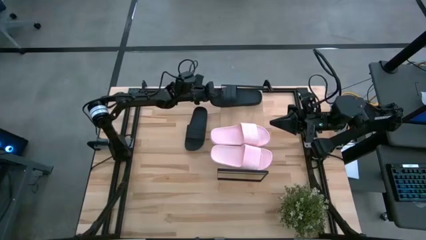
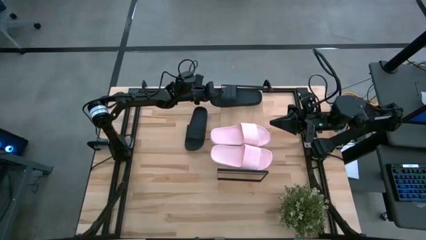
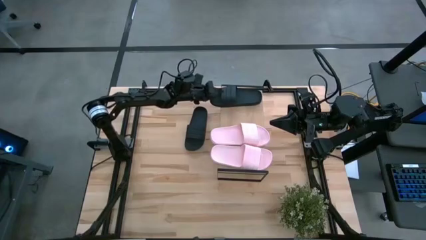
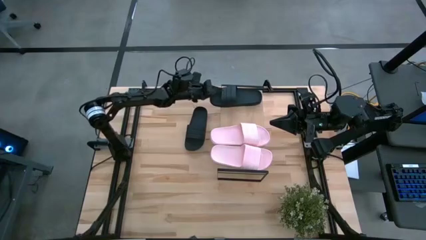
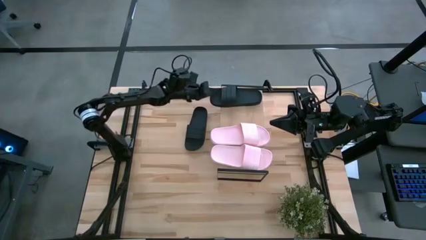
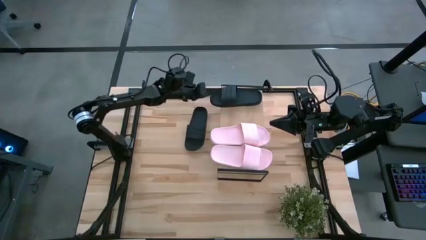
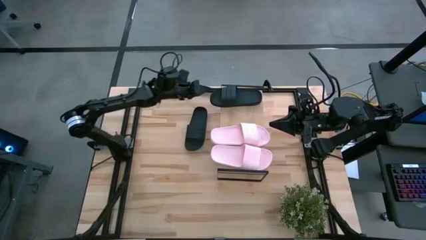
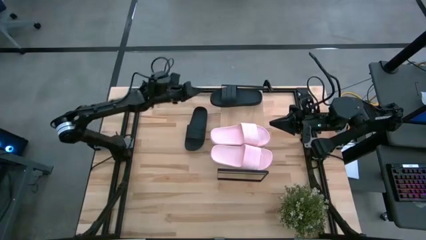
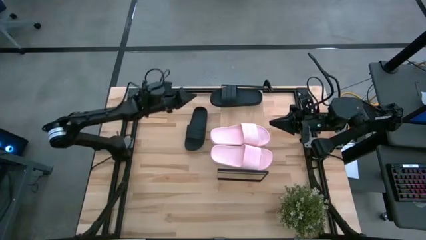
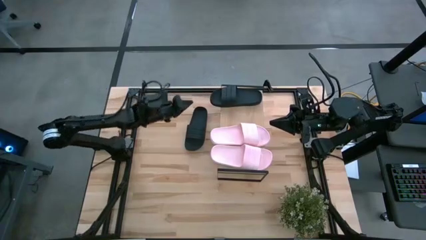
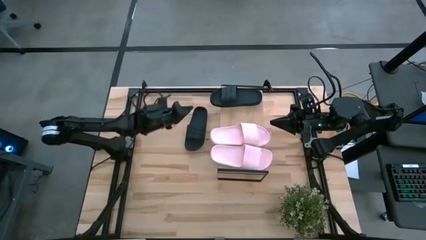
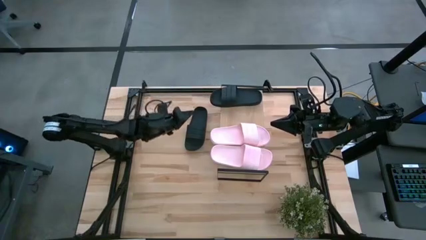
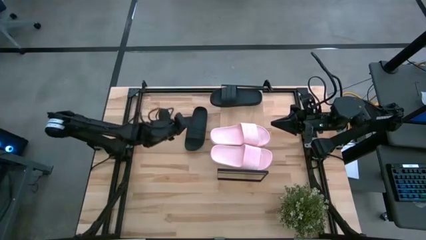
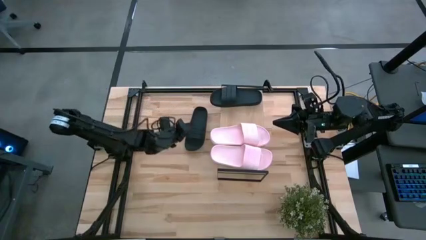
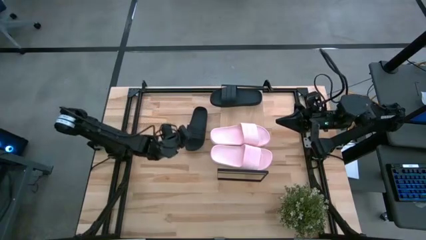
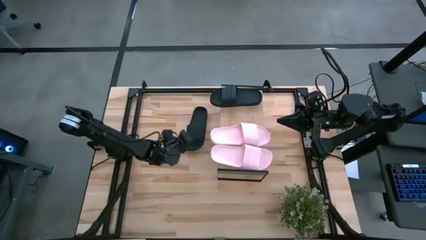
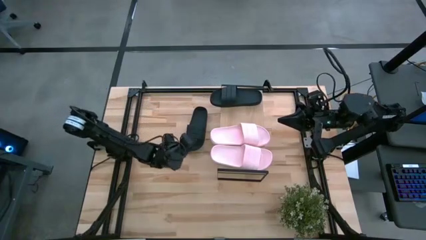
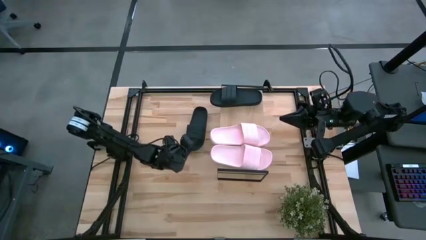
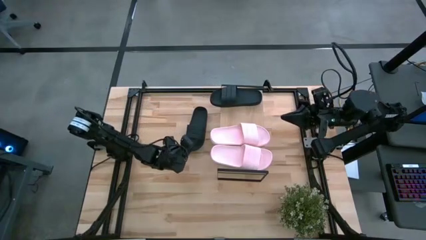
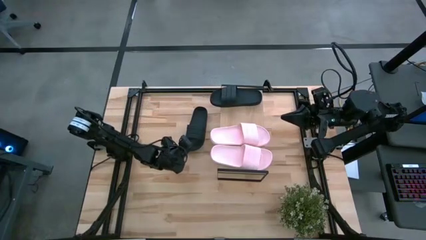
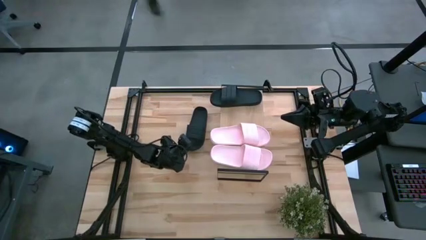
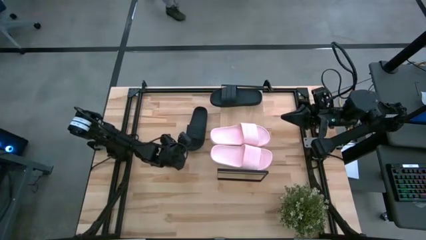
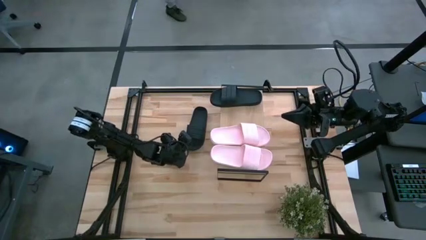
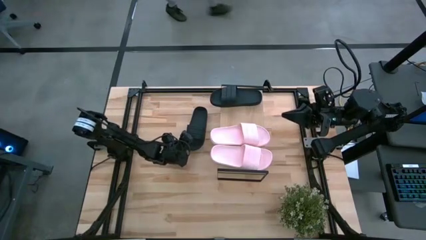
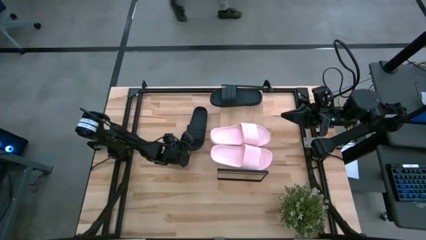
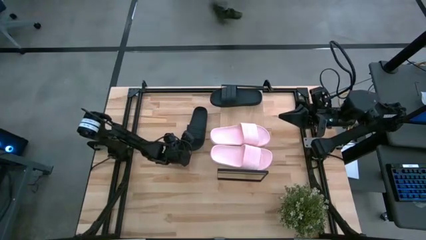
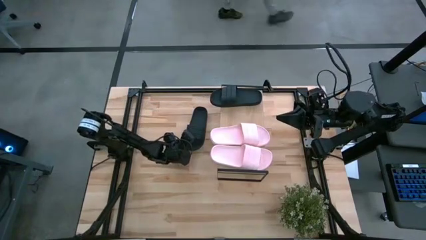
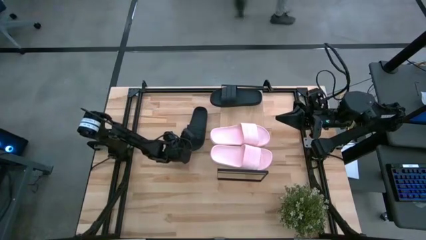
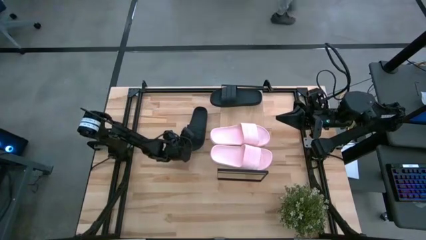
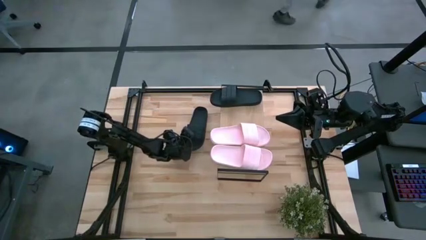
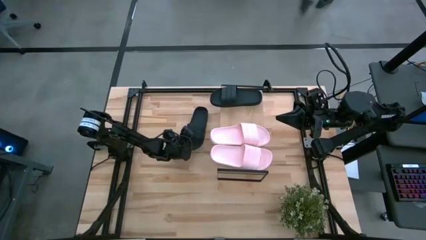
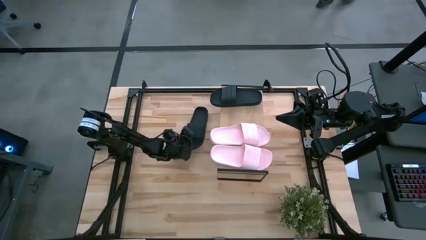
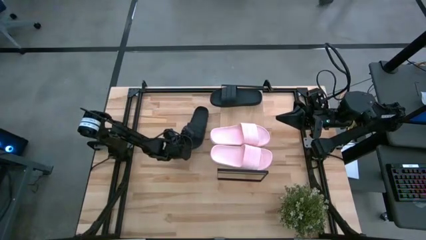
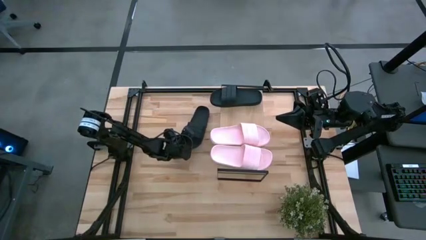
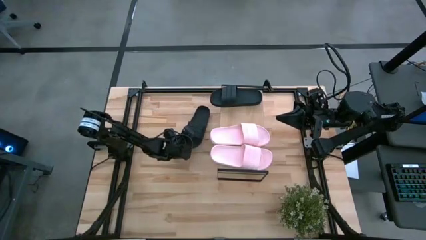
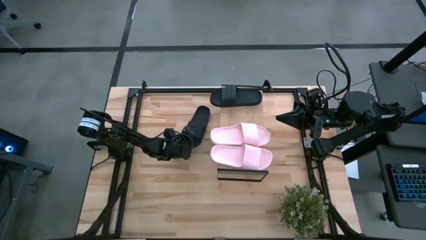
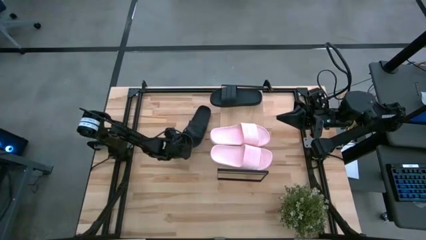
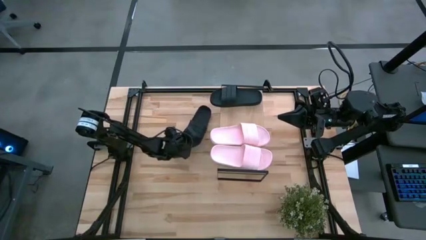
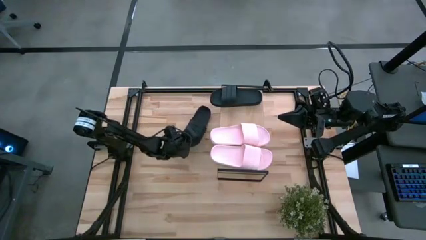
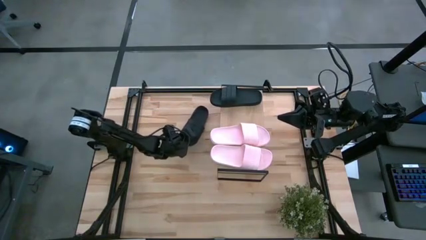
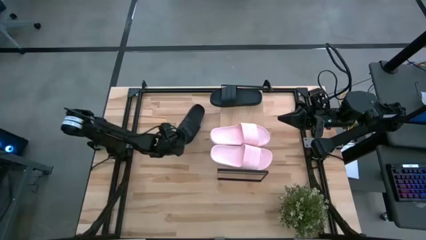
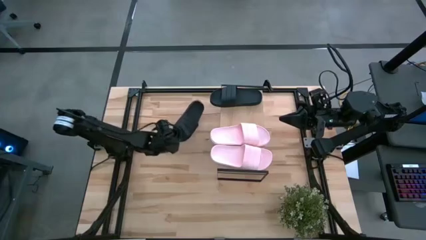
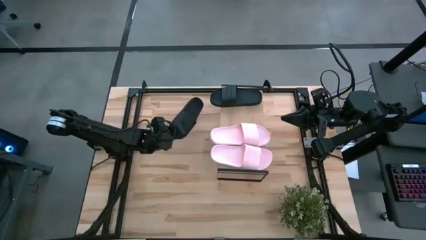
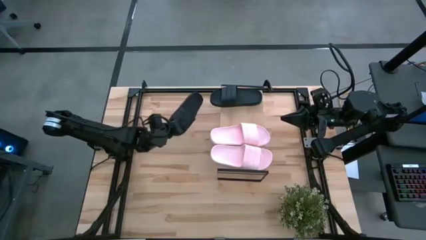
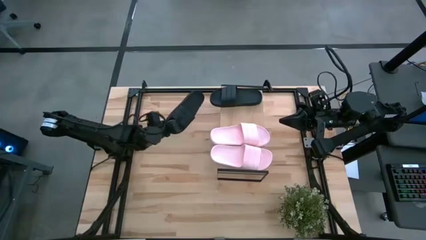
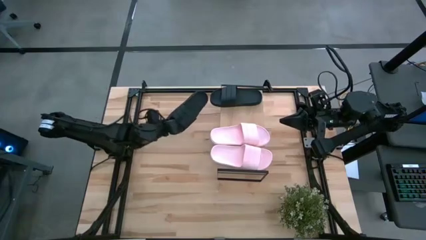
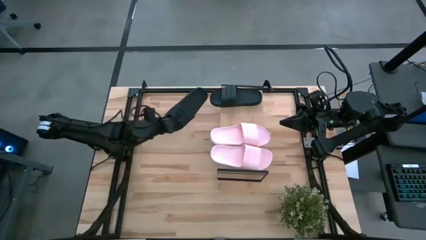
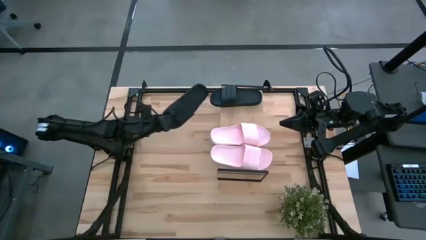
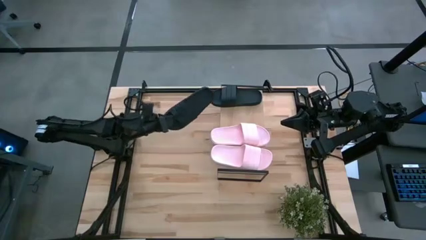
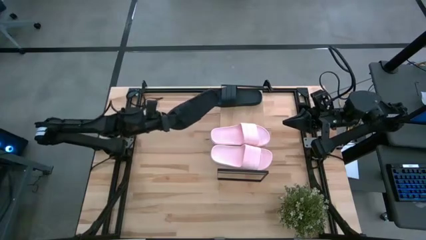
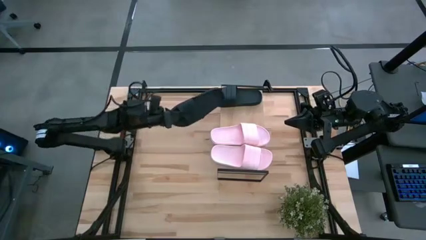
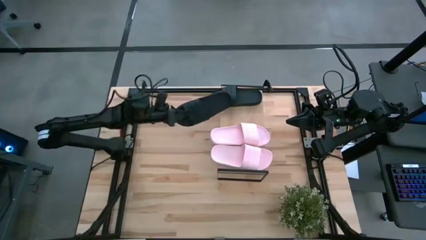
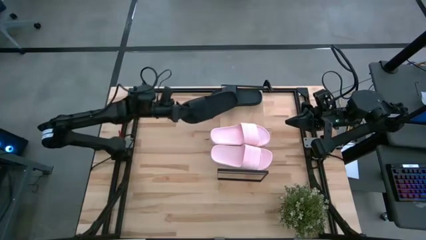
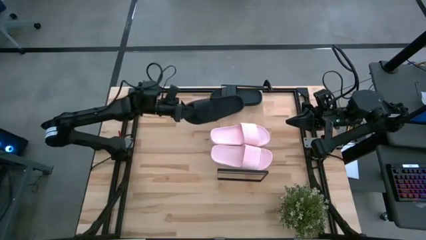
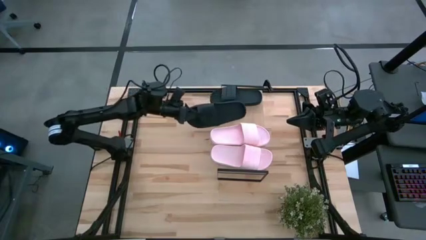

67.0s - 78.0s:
Task: Pick and place slides into the shelf
Put the black slipper on the shelf
